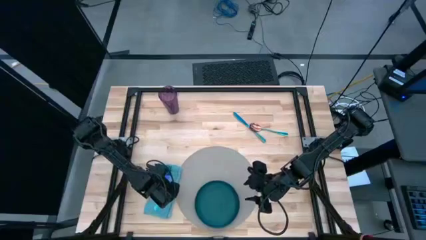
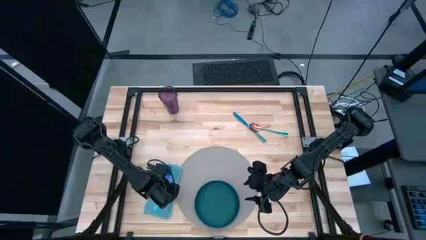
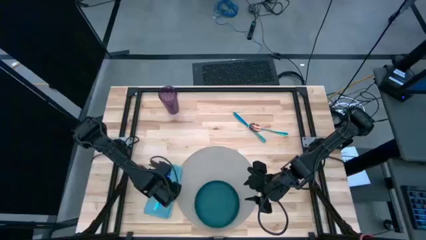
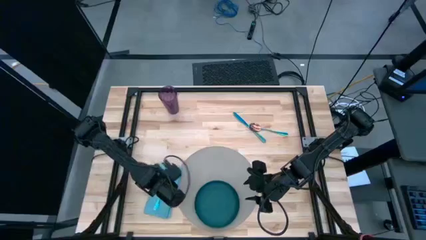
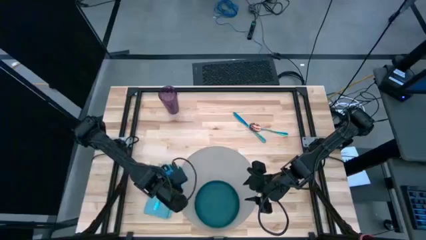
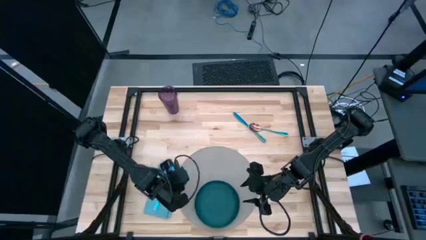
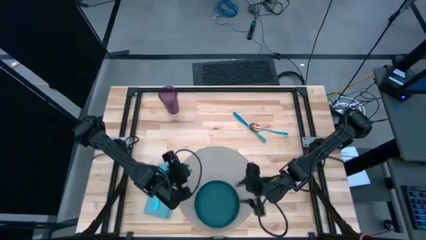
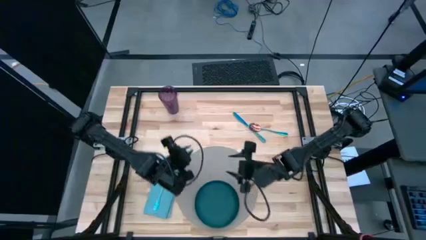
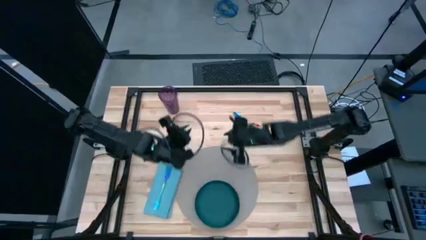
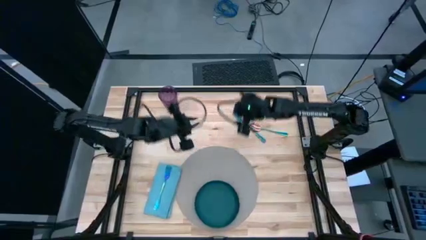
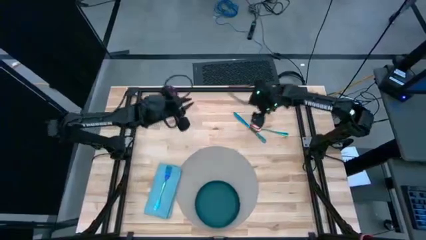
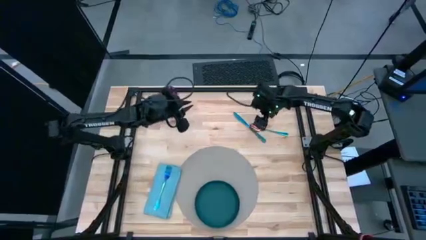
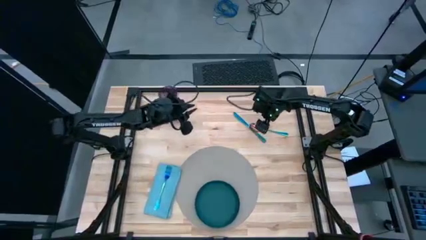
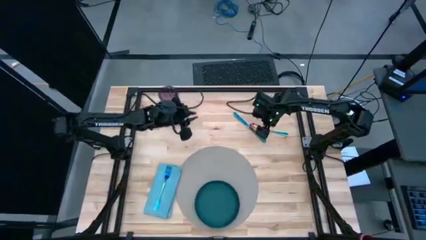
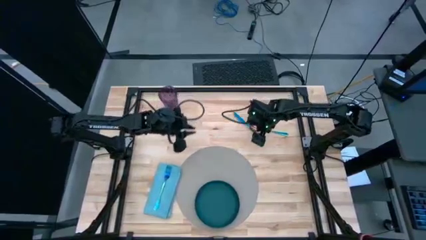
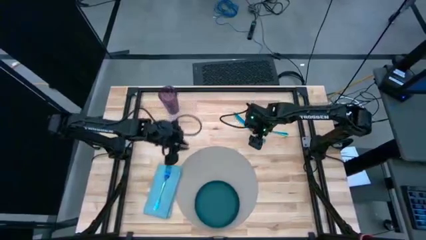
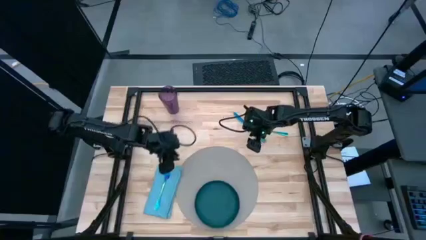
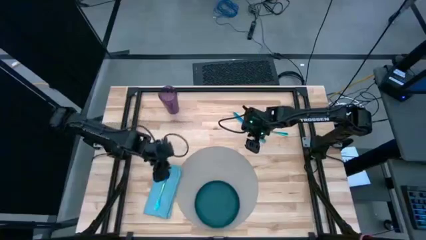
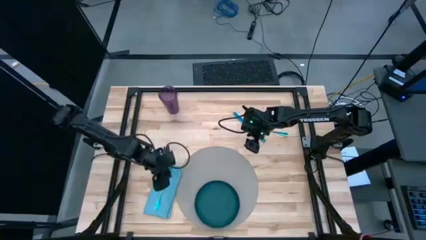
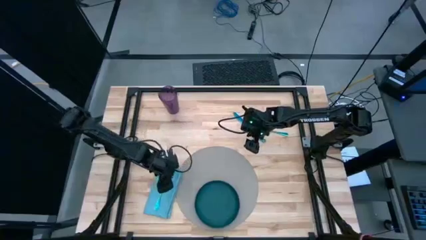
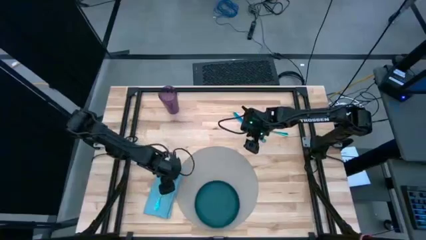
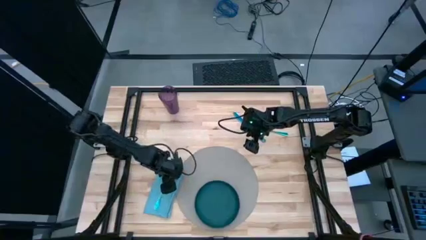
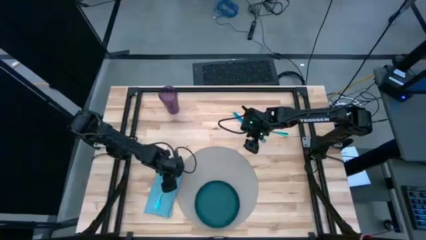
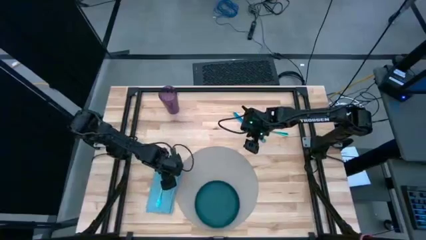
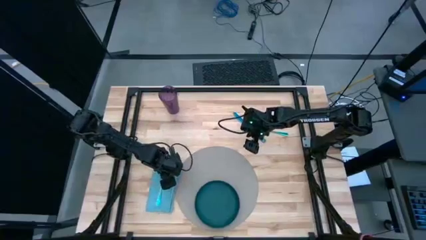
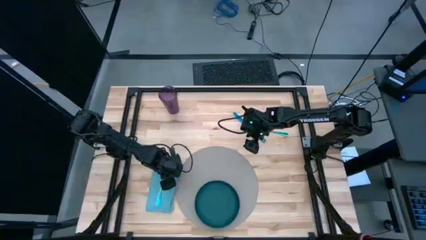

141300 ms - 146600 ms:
Task: Set table place
Adjust the blue table napkin

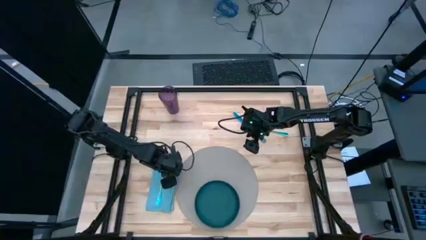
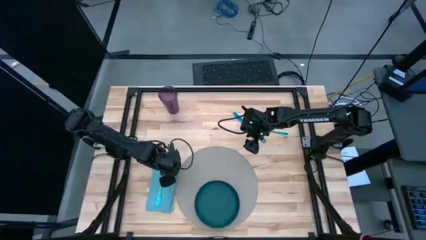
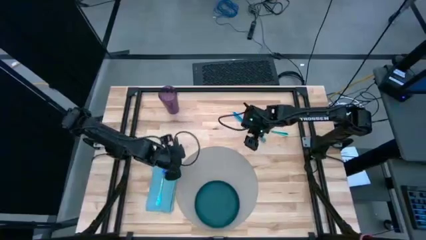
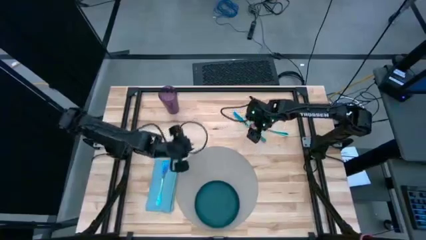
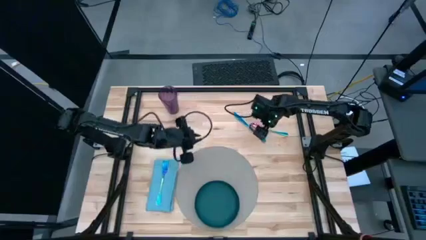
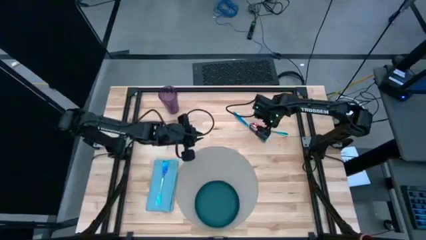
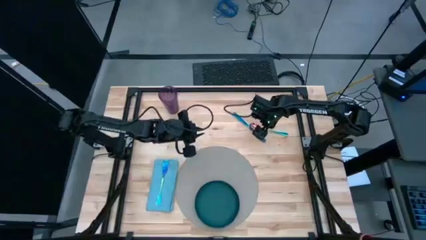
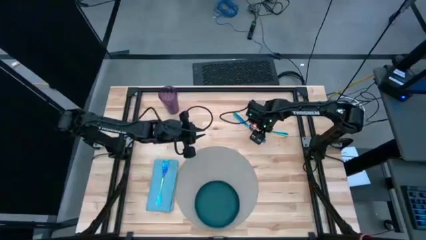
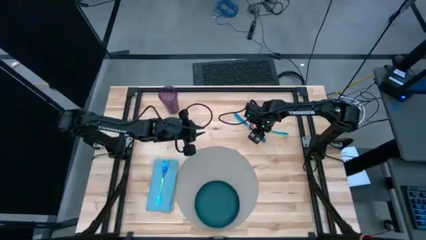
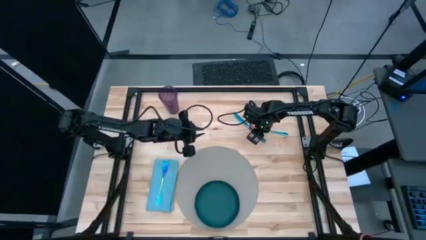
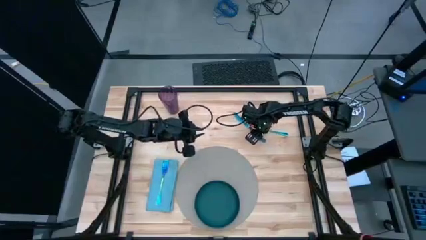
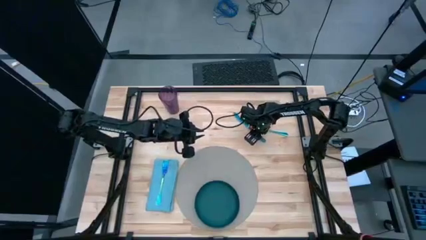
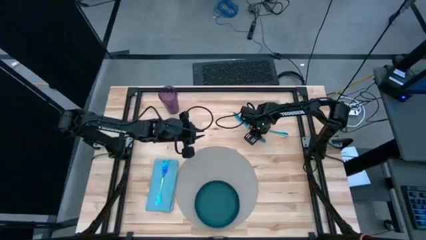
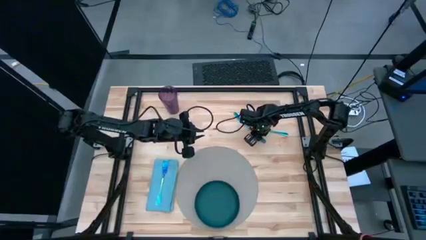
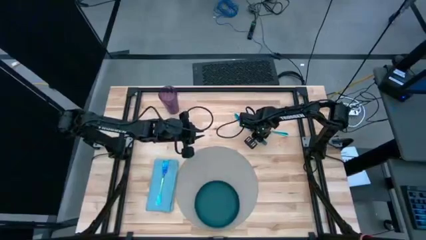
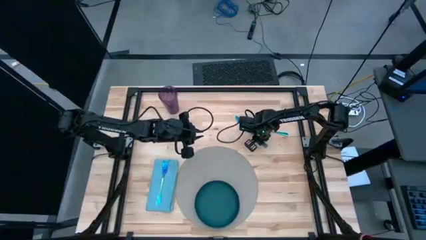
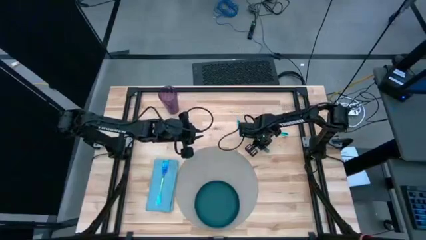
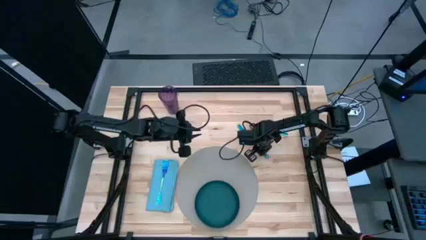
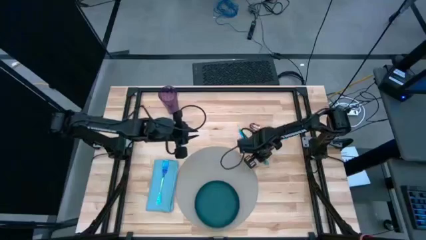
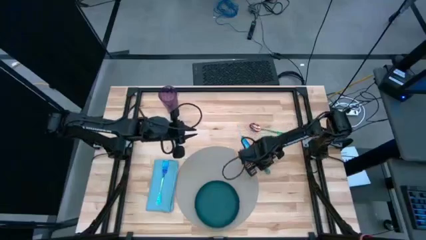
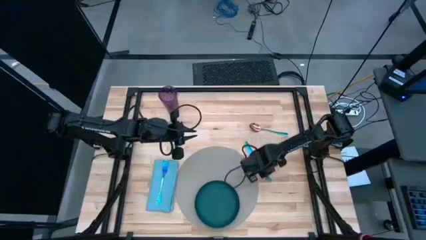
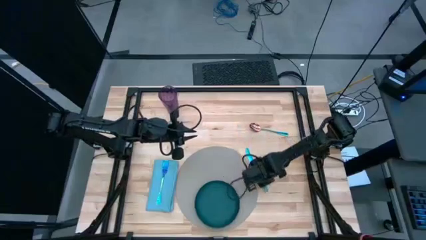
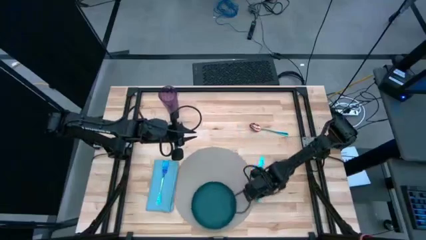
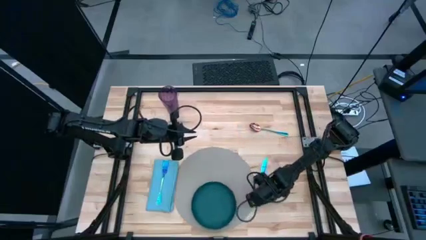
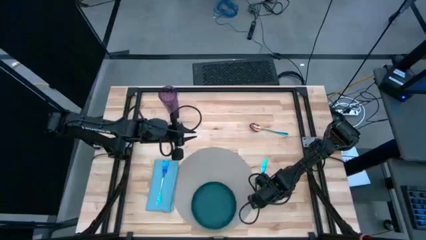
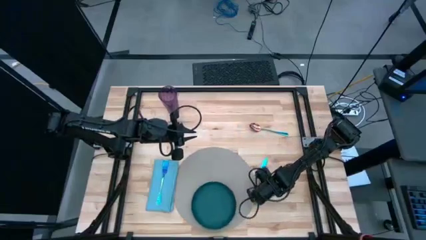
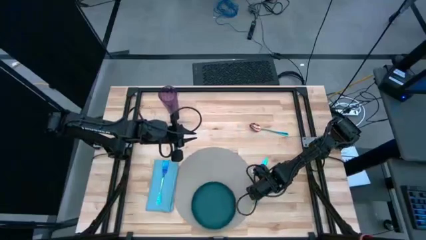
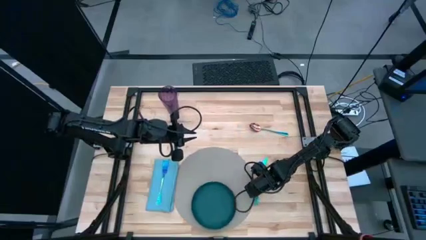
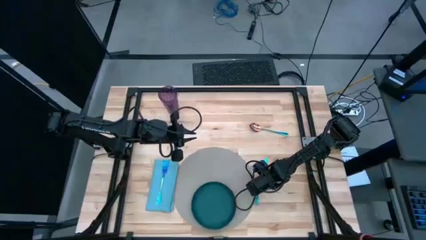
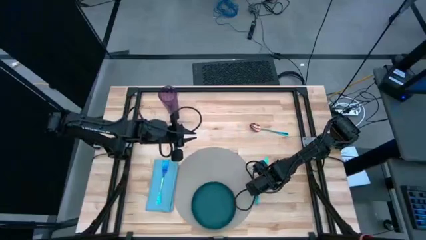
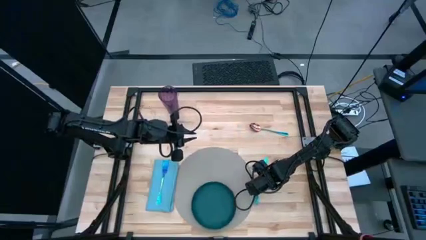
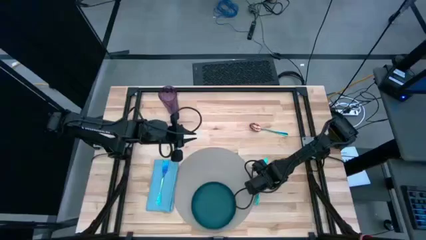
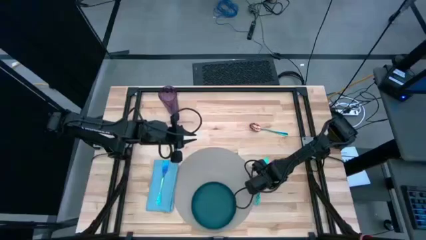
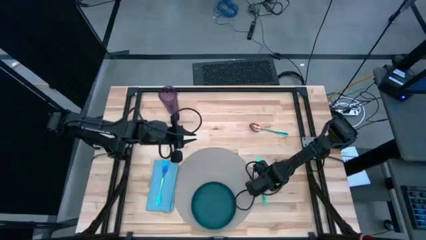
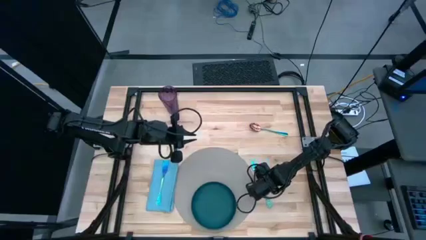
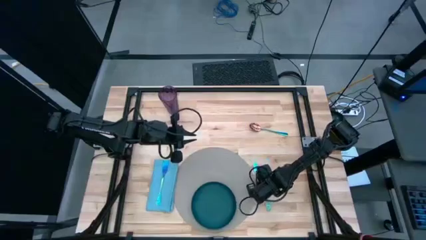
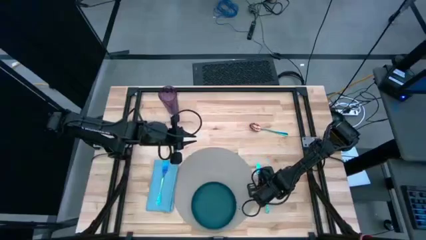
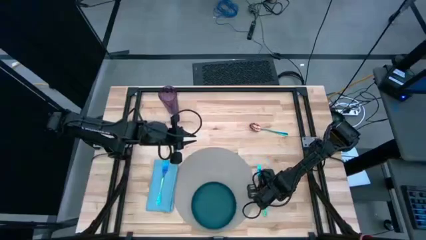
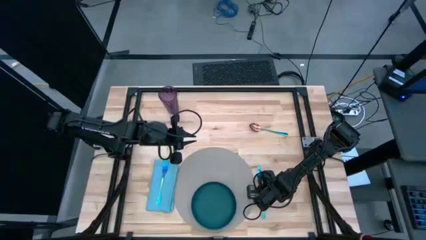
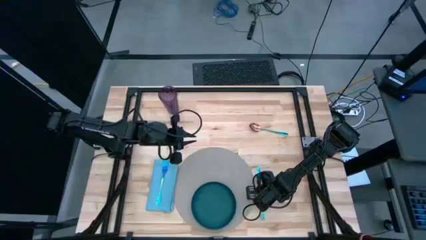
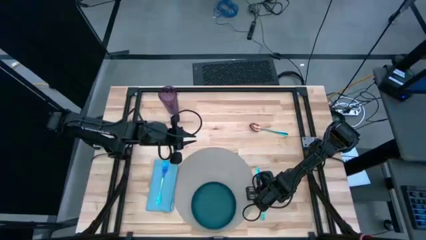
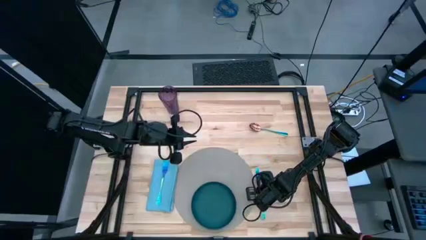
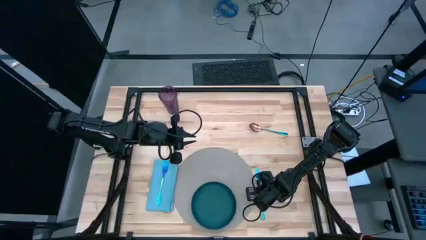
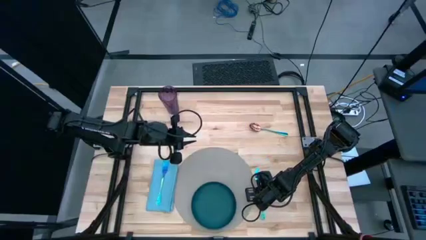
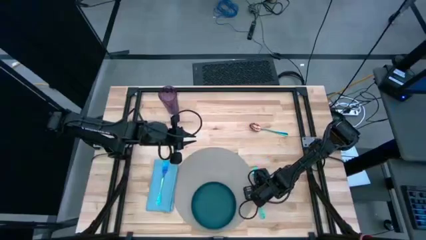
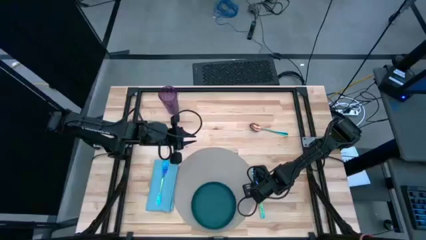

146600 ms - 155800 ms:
Move the blue table knife to the right of the gray placemat

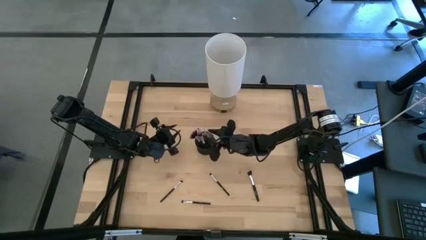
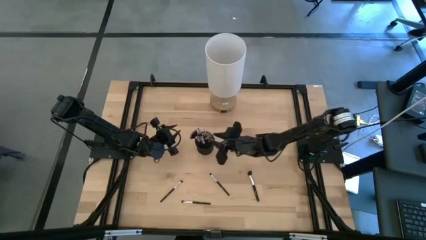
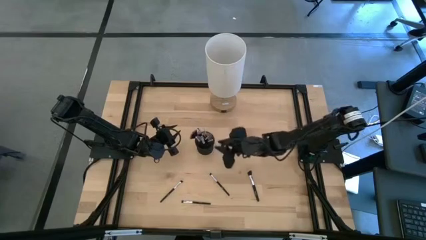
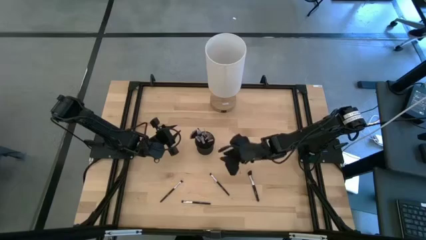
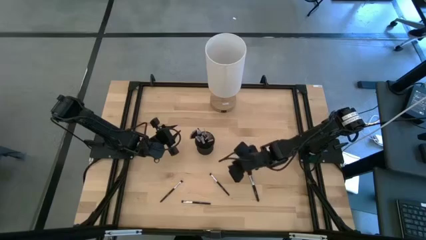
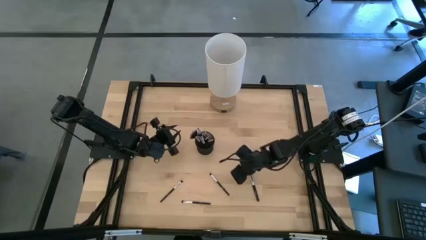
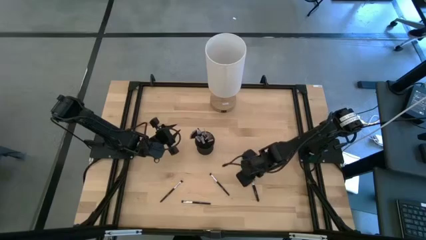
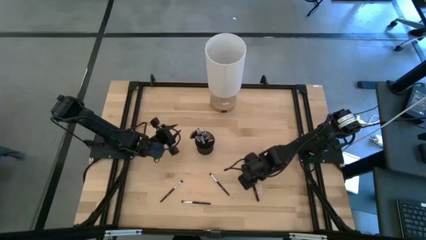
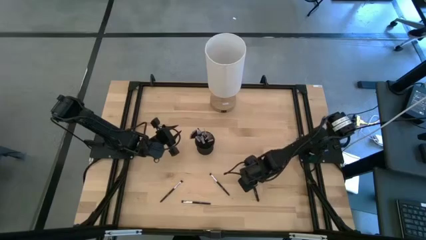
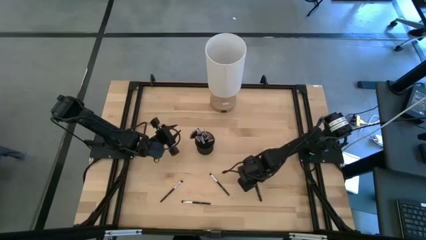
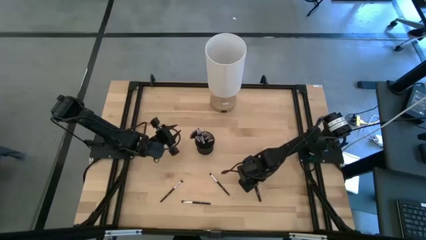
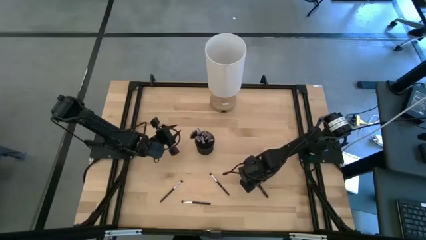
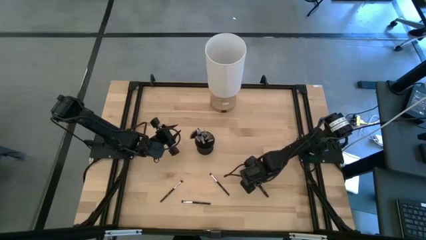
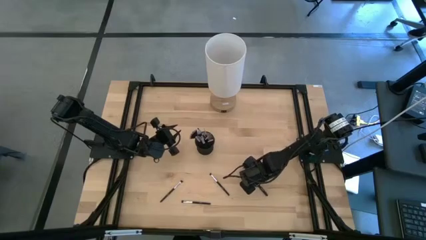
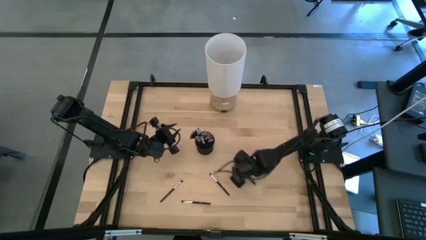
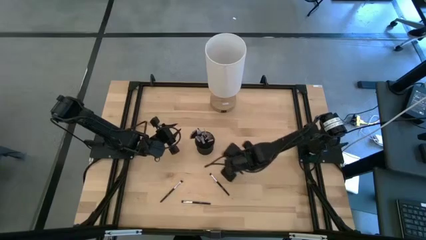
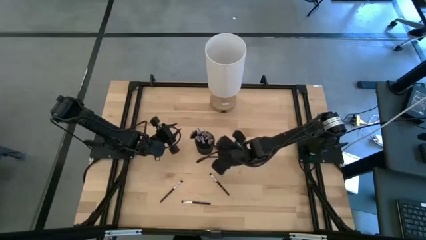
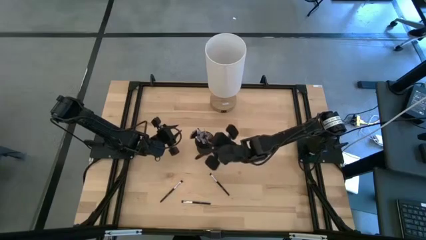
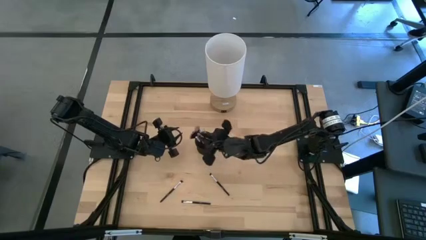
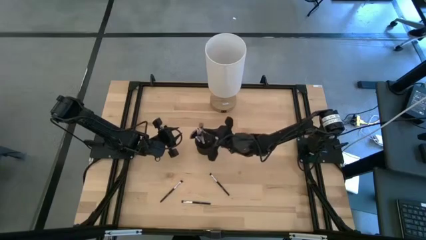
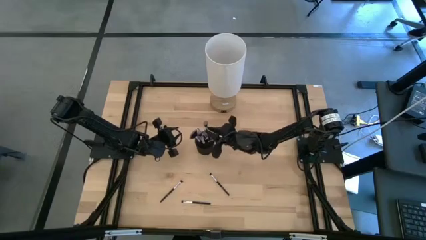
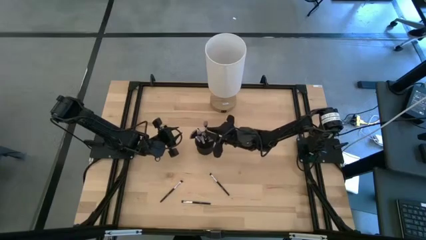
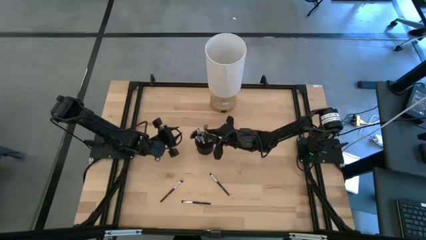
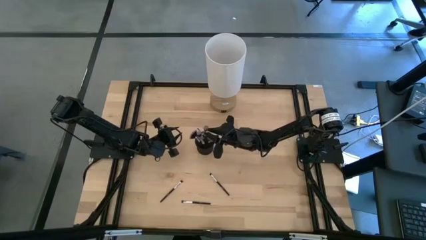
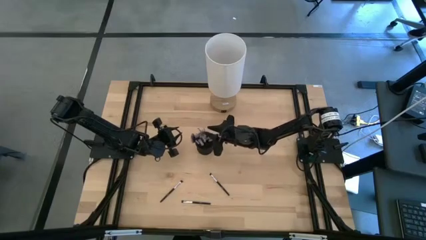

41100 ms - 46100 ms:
Task: Put items in baskets/containers
Put the powder brush into the holder
